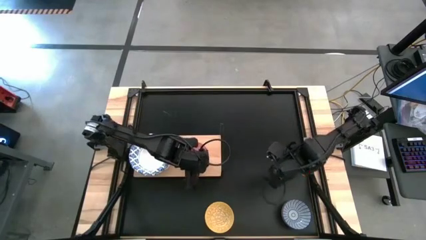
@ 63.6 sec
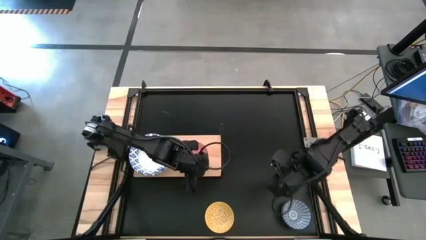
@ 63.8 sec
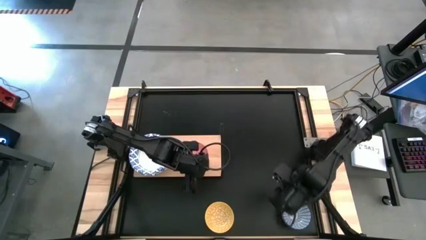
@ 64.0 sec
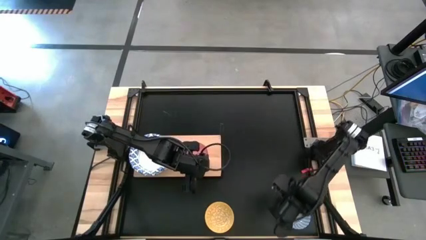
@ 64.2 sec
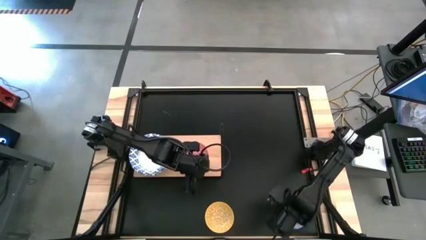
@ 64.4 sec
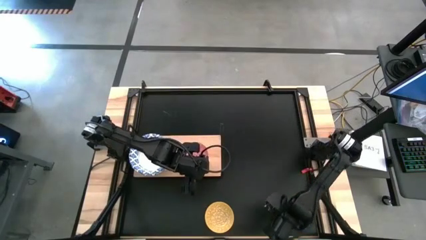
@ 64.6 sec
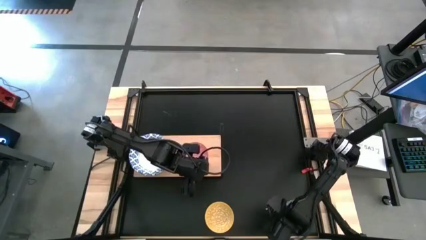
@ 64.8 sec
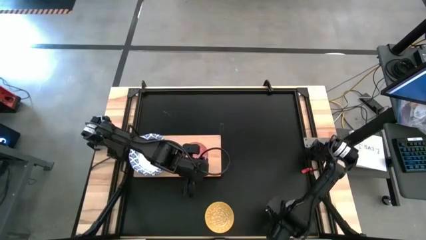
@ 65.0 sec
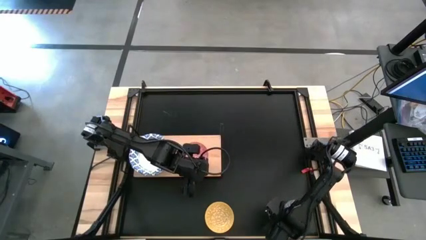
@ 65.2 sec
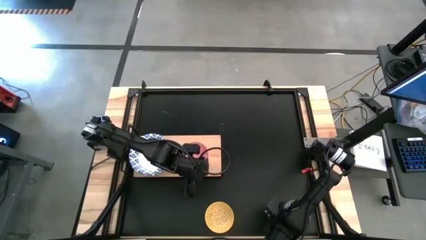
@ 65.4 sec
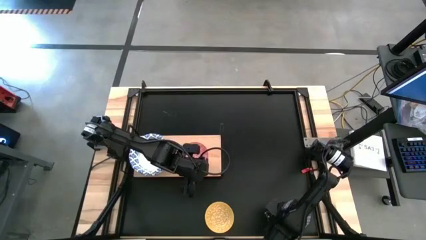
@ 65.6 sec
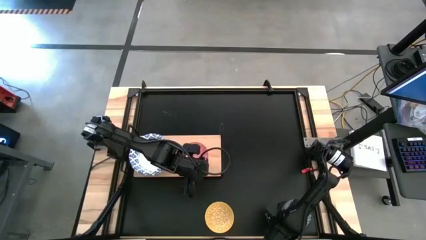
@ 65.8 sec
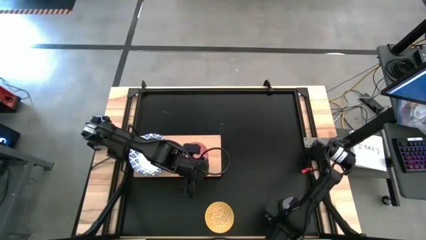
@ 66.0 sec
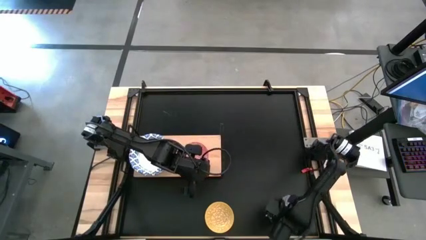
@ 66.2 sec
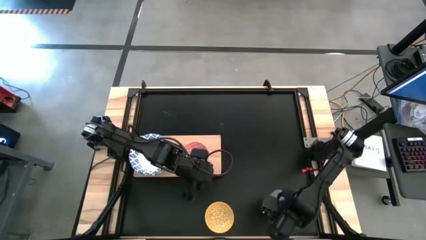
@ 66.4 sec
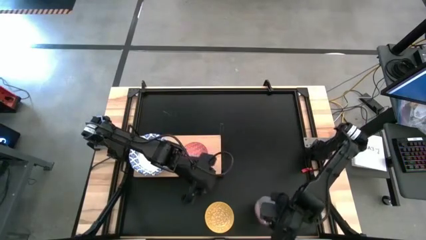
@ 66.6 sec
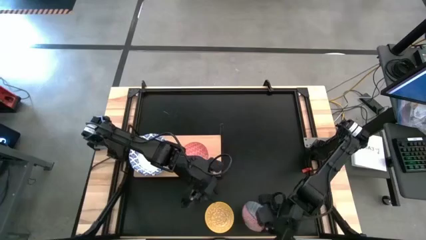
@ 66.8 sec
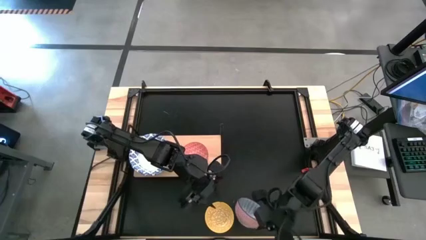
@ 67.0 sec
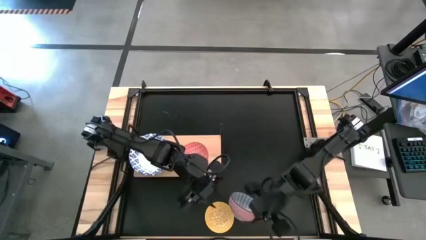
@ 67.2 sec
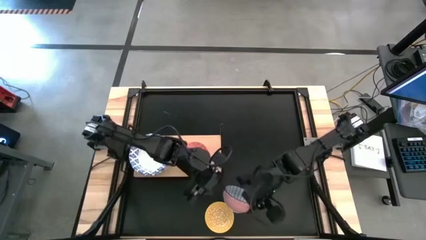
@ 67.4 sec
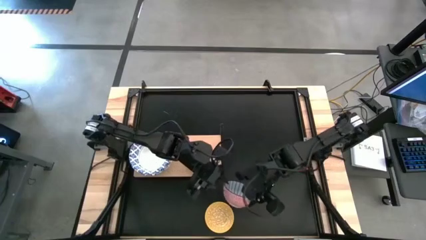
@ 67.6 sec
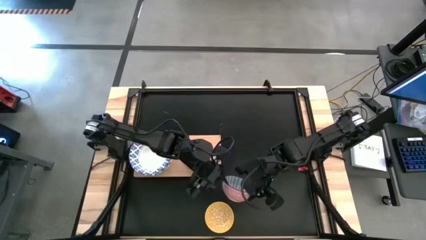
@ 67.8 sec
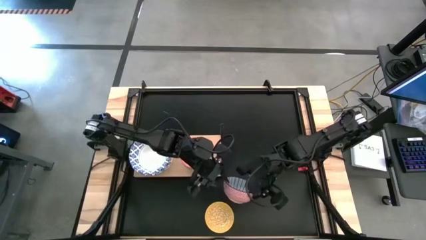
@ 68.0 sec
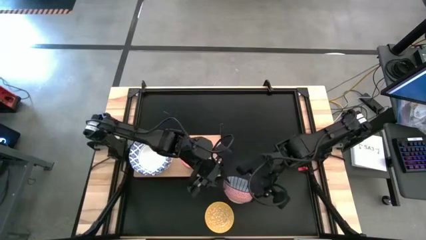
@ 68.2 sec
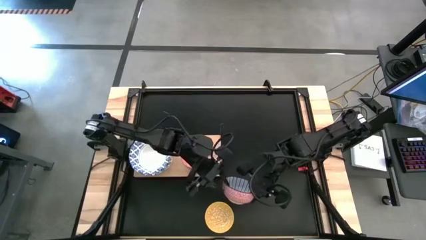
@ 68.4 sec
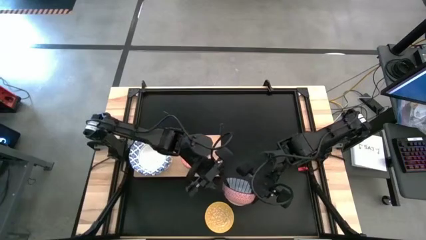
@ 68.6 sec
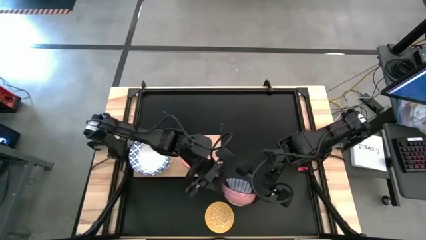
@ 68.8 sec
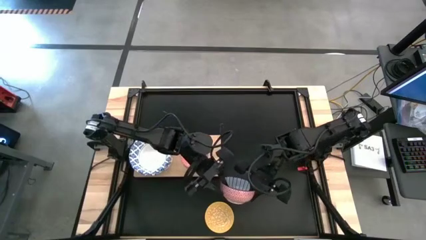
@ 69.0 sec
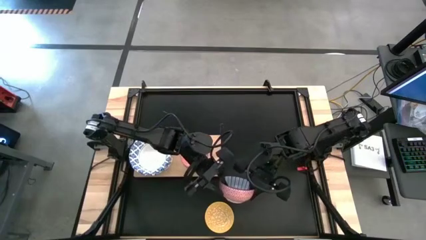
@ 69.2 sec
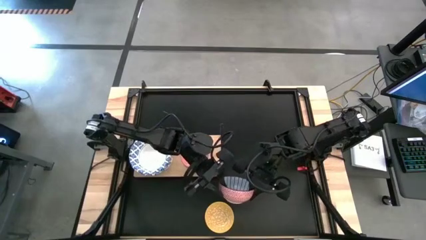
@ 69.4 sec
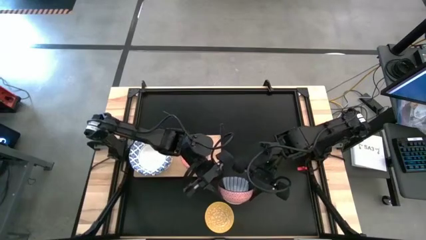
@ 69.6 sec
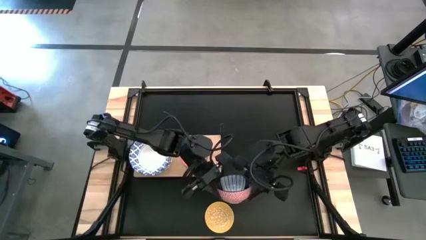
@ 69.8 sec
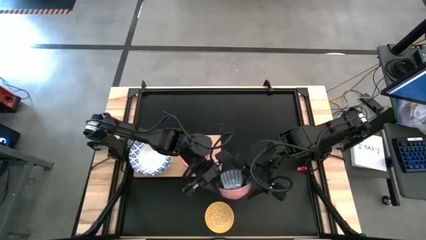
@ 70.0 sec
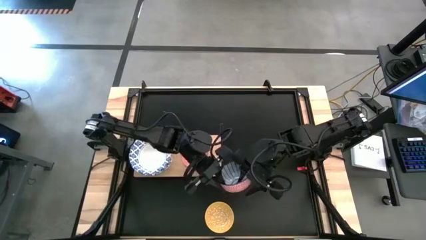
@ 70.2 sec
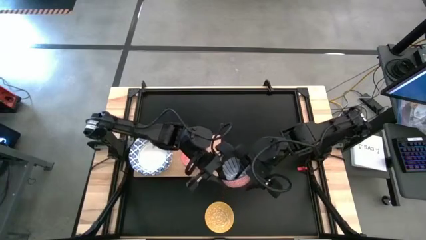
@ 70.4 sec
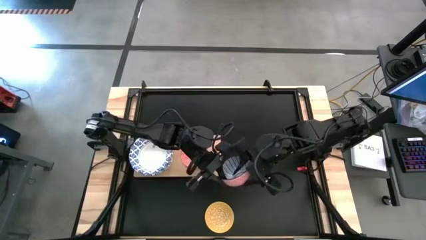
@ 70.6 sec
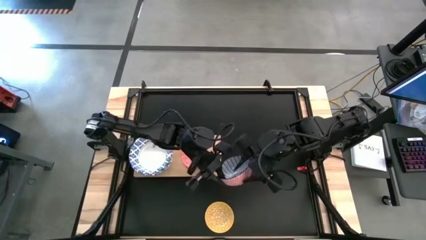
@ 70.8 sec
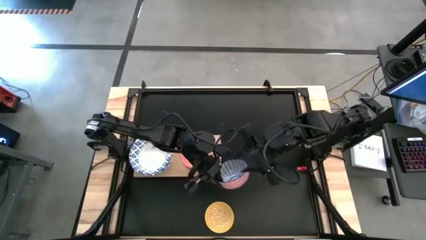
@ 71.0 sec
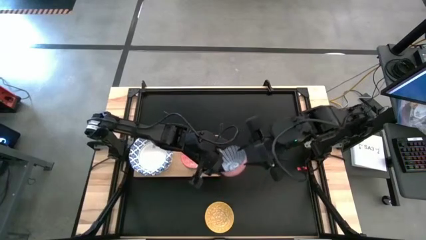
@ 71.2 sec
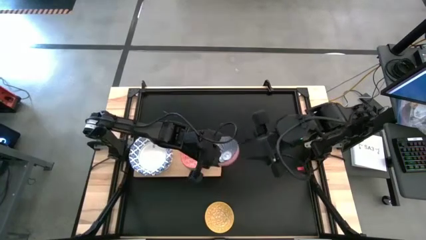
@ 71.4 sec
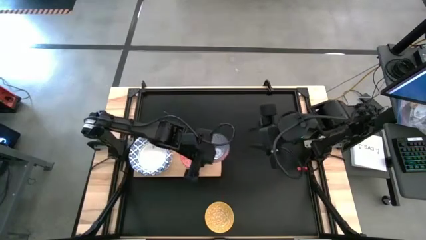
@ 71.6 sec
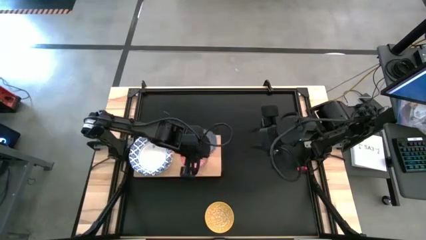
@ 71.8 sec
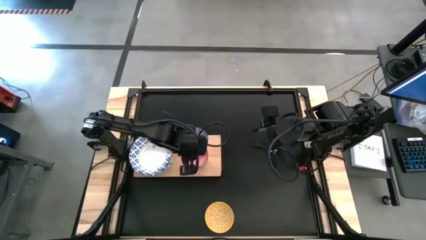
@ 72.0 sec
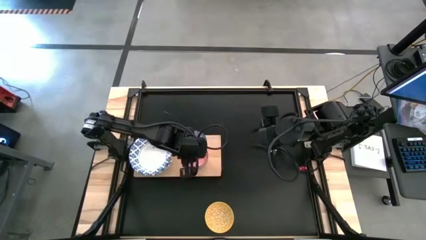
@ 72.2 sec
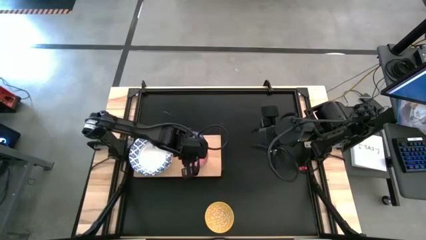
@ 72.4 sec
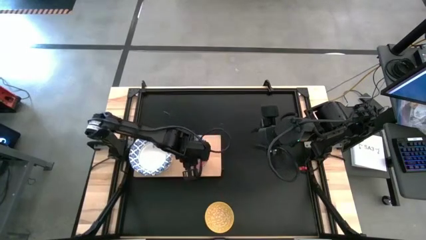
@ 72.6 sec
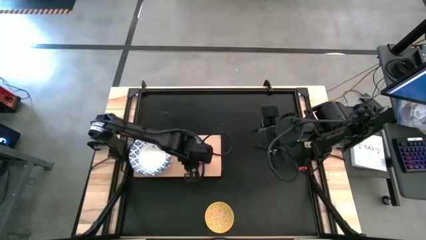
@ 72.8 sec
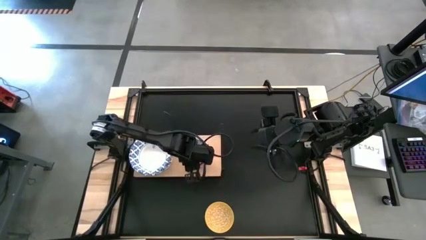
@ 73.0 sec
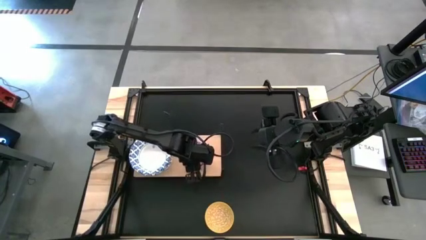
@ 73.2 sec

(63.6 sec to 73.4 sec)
Task: Place and stack bowls onto a shelf
Stack the dark blue bowl on top of the red bowl on the shelf

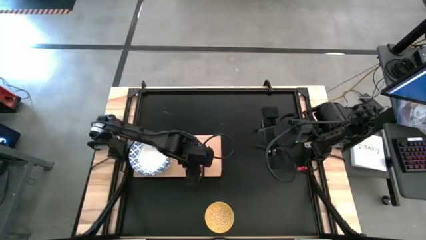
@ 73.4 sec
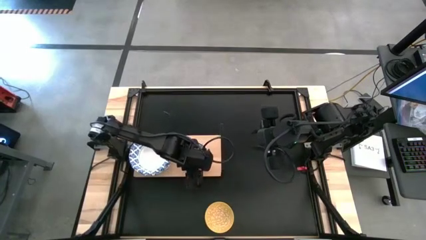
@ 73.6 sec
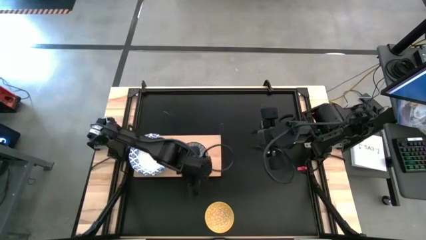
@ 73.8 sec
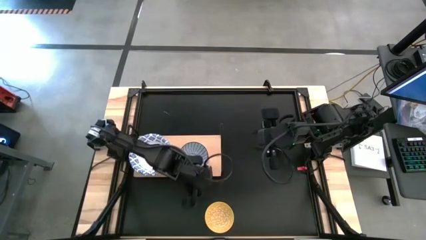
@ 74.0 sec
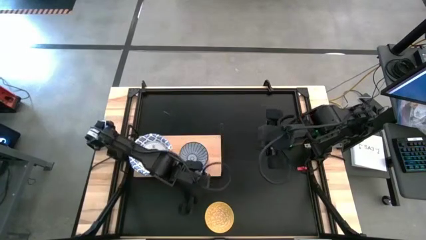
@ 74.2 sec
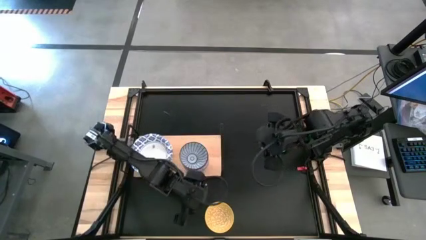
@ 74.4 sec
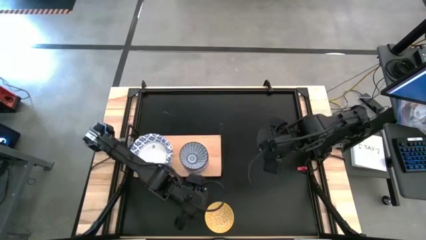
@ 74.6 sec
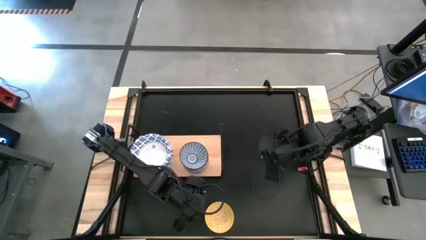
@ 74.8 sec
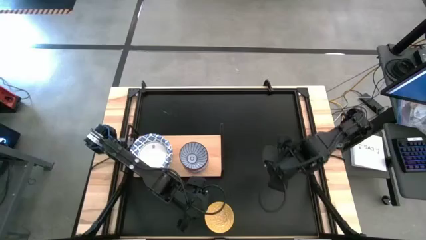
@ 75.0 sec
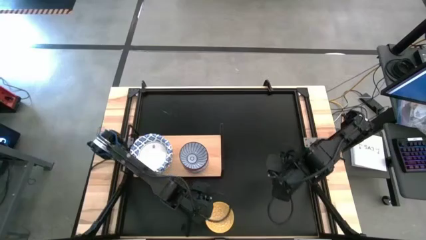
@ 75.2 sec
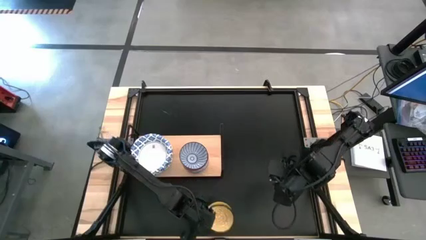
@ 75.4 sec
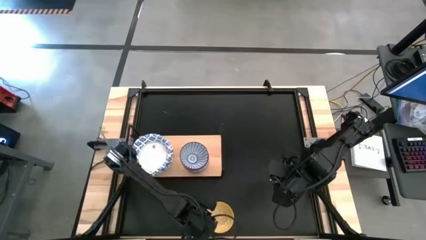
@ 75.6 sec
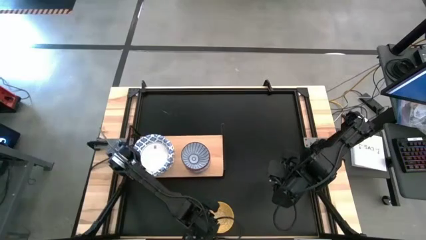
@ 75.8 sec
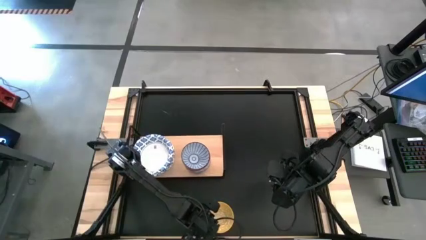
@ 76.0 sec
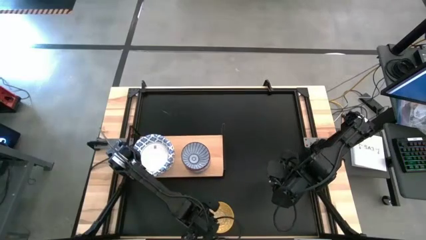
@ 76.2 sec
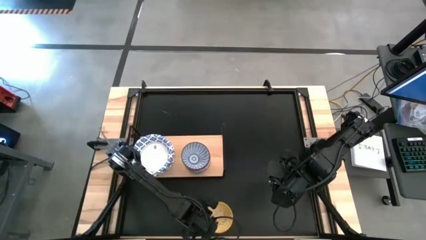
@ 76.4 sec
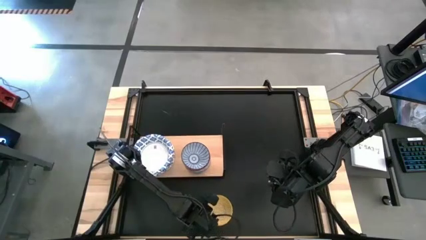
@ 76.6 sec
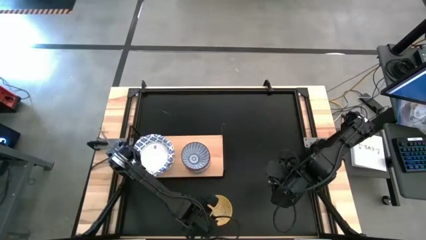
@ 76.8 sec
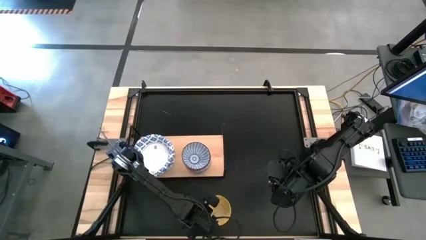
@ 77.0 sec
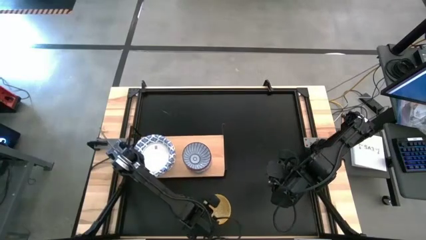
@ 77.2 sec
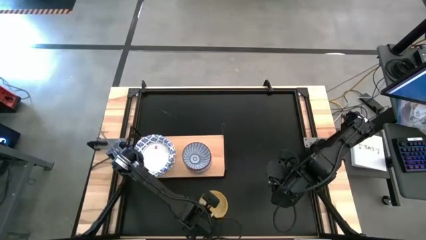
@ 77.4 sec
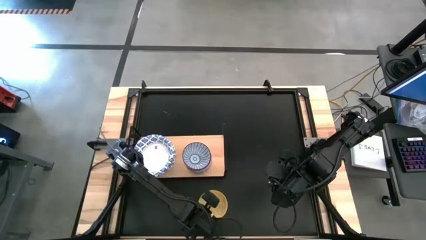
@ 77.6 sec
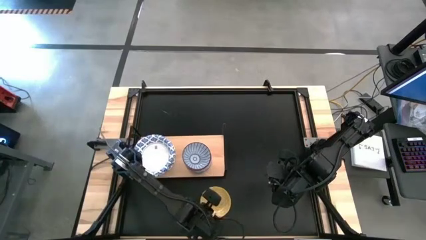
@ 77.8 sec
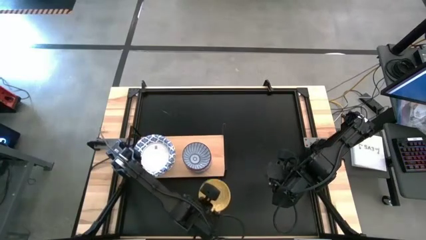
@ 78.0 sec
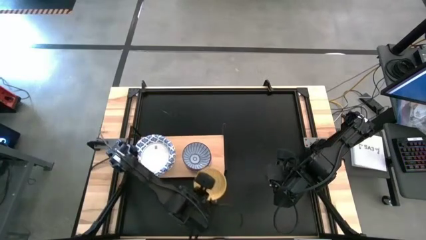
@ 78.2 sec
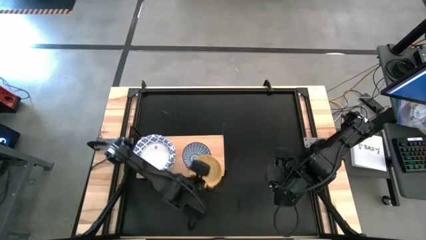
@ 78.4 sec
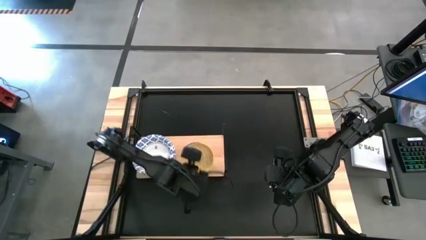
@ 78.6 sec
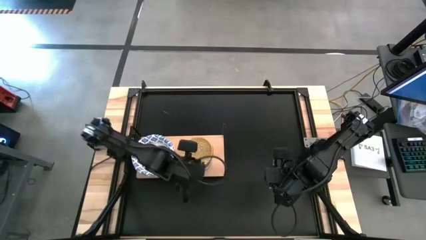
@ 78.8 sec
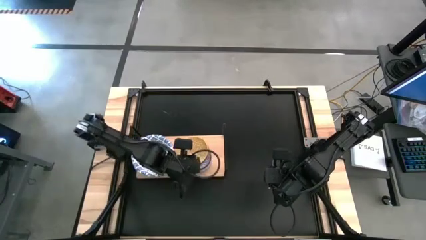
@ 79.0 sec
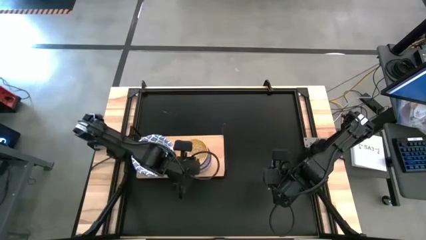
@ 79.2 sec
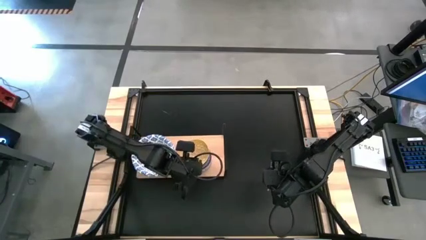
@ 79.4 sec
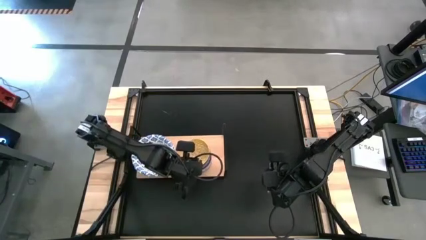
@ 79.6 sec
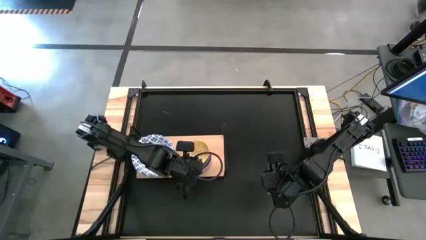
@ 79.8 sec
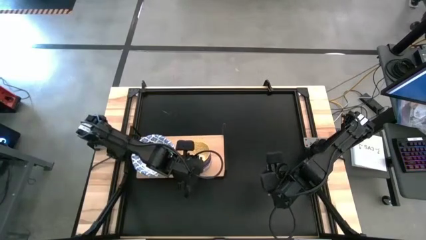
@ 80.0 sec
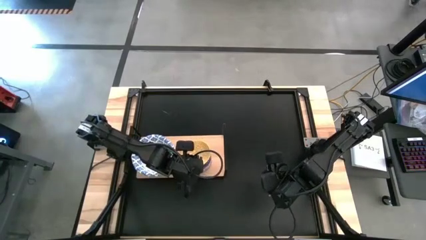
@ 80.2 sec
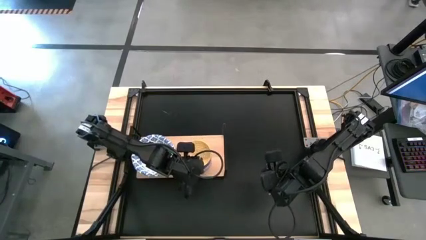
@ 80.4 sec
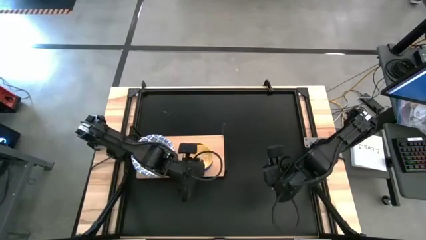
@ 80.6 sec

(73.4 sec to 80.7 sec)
Stack the yellow bowl on top of the dark blue bowl on the shelf
